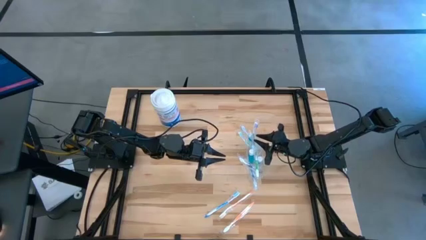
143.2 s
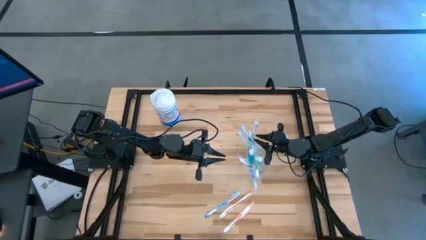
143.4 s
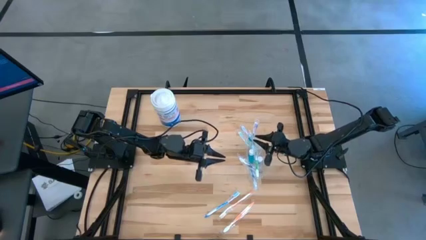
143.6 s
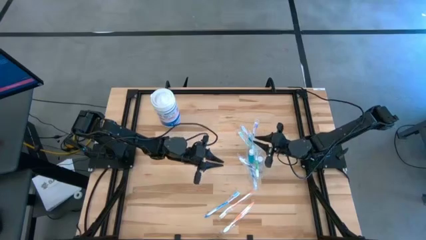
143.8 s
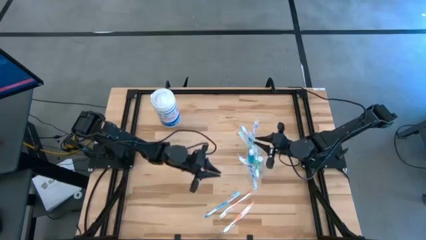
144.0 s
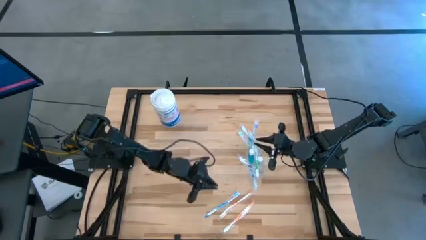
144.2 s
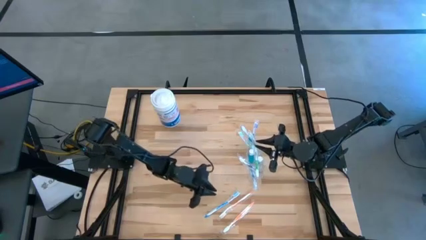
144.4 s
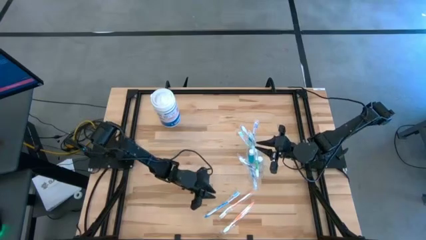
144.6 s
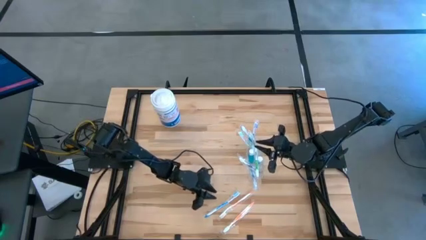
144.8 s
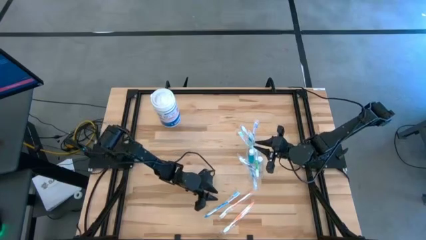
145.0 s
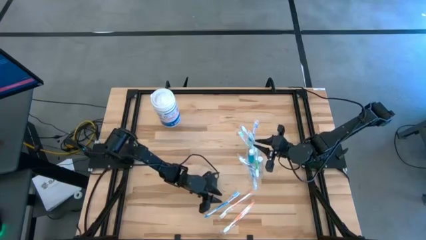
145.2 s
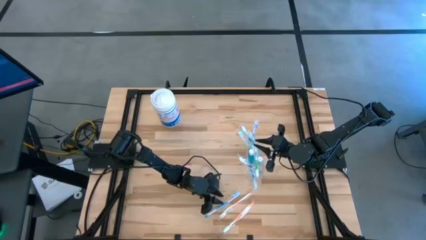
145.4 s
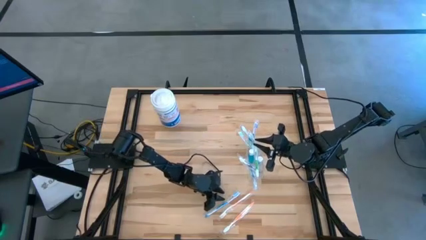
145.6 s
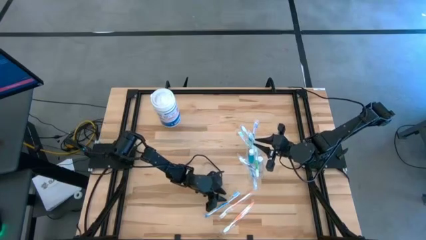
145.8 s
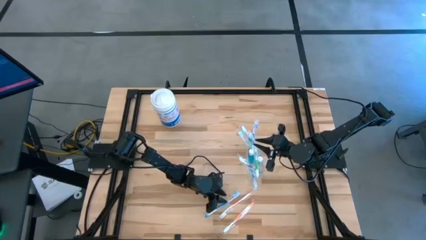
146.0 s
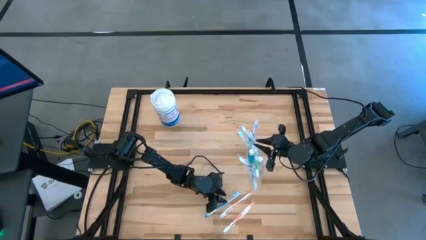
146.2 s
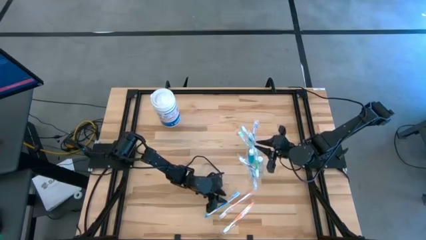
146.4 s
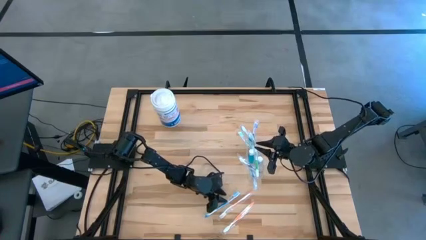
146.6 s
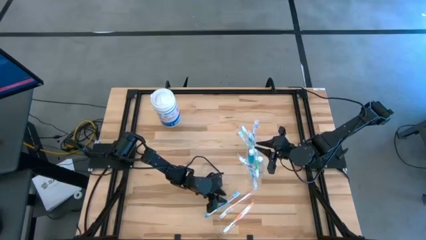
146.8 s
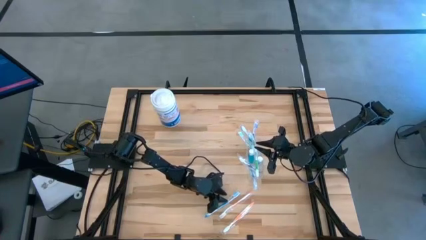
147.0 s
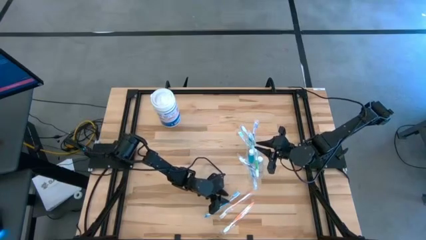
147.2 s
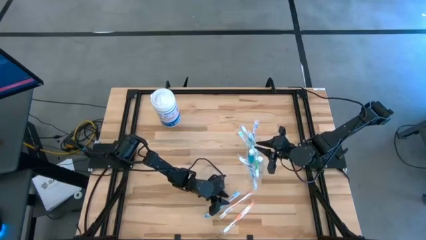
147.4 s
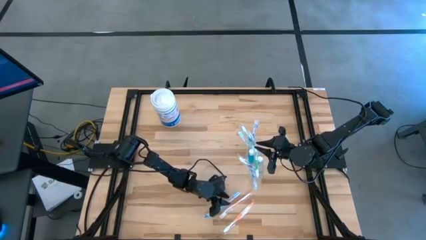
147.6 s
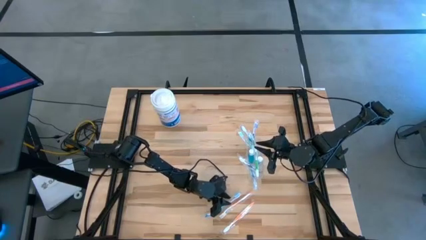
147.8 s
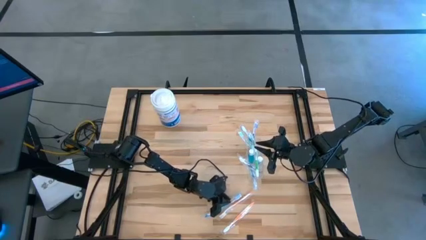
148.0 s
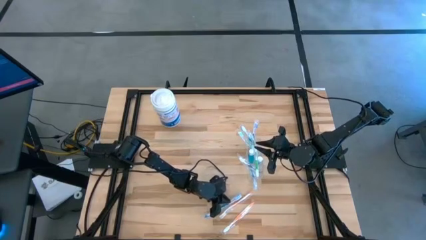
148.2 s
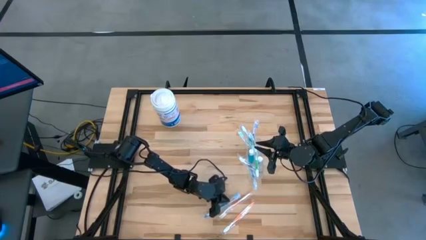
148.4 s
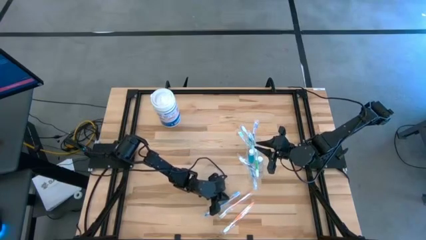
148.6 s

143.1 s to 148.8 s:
Task: Pick & Place toothbrushing station
Put the blue toothbrush into the transparent organizer

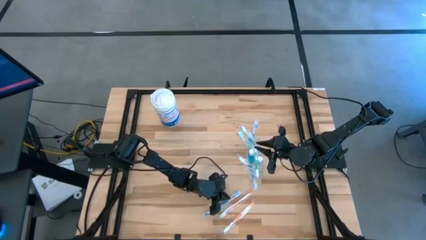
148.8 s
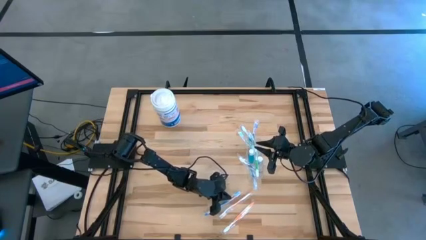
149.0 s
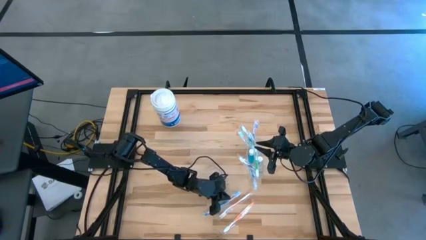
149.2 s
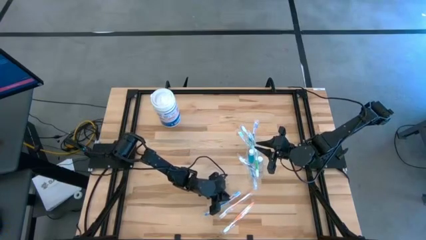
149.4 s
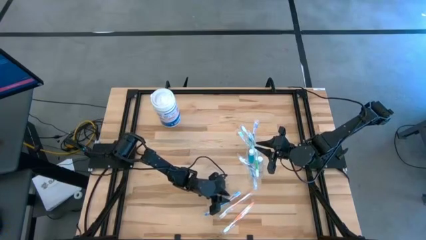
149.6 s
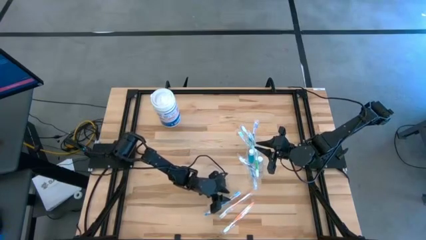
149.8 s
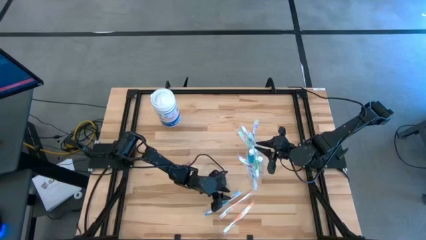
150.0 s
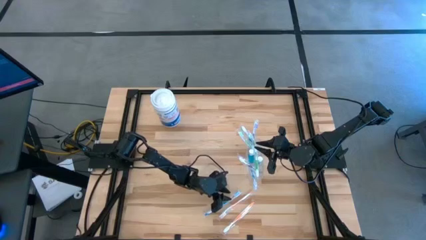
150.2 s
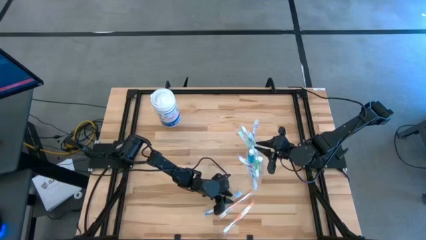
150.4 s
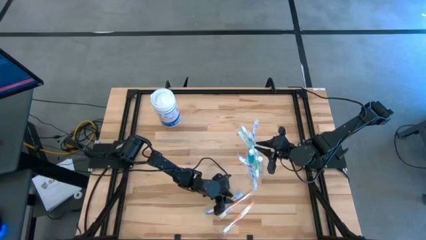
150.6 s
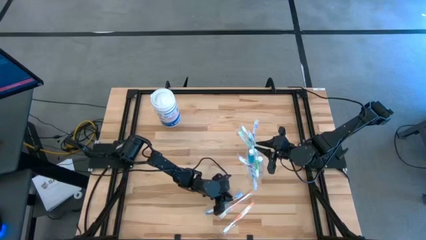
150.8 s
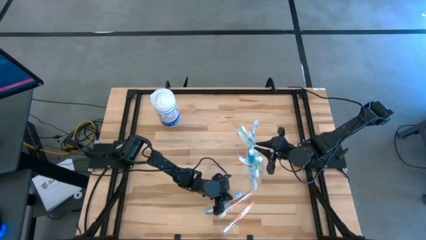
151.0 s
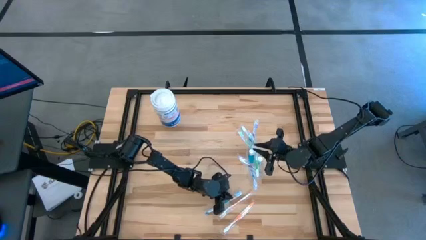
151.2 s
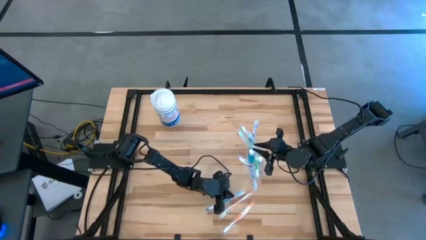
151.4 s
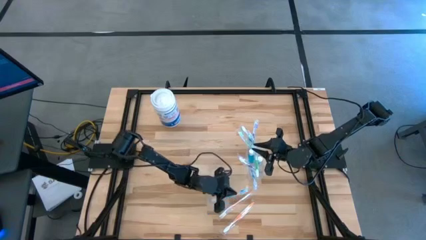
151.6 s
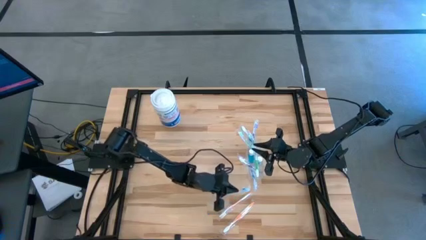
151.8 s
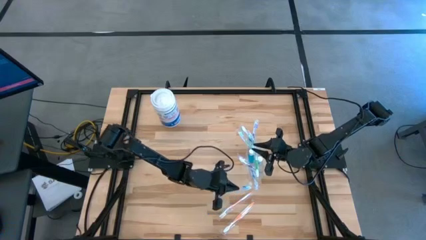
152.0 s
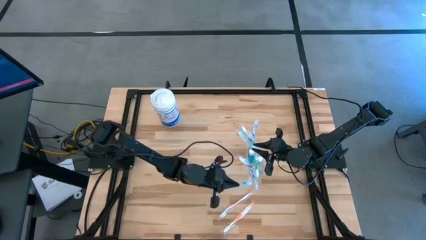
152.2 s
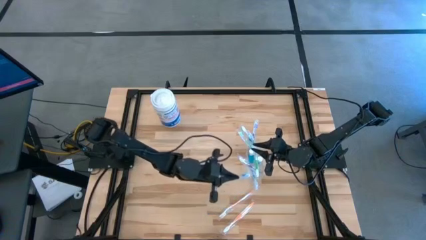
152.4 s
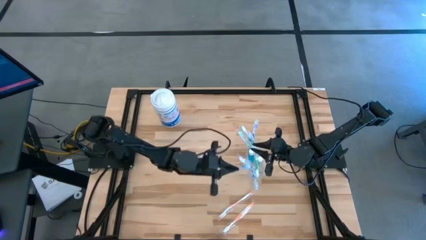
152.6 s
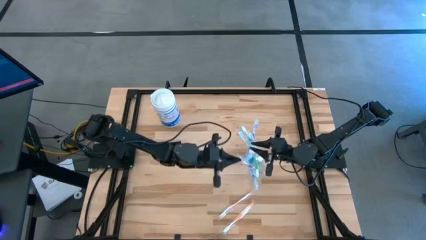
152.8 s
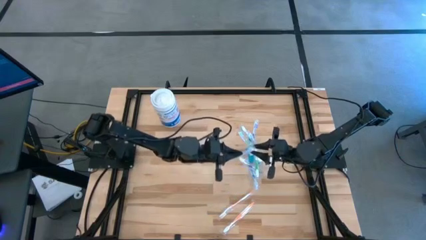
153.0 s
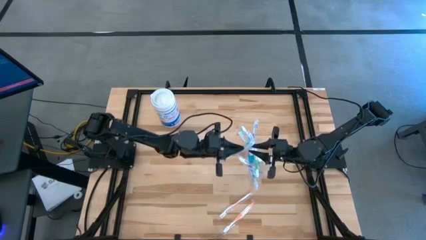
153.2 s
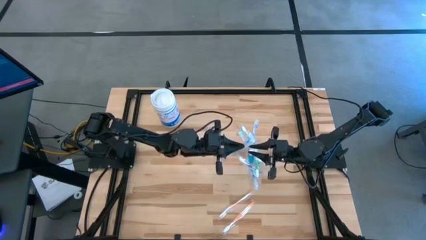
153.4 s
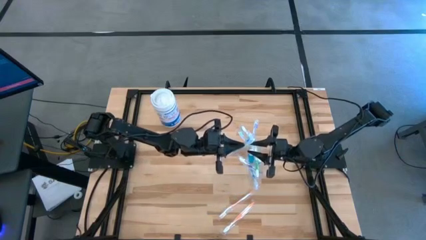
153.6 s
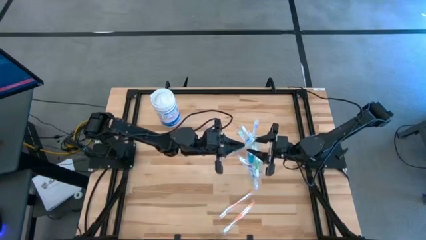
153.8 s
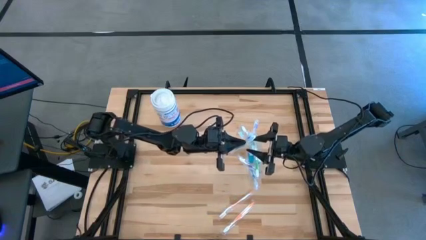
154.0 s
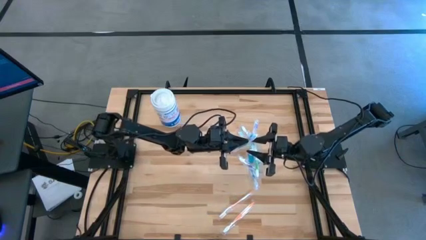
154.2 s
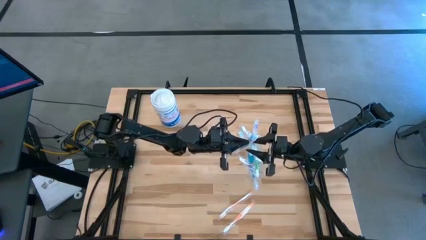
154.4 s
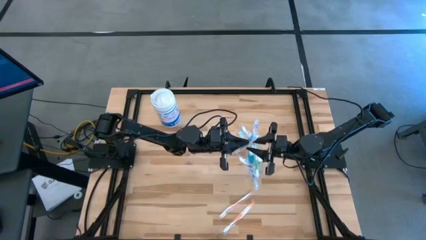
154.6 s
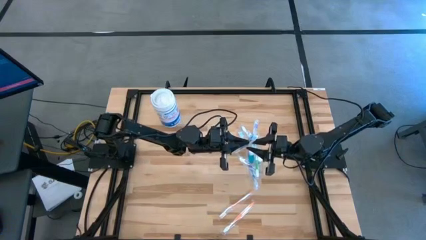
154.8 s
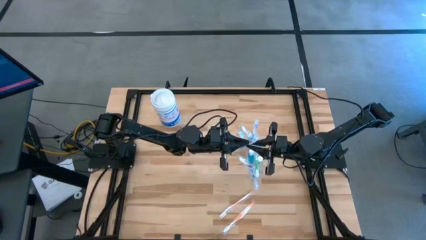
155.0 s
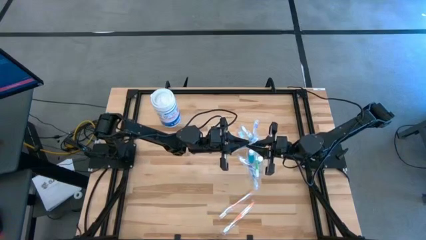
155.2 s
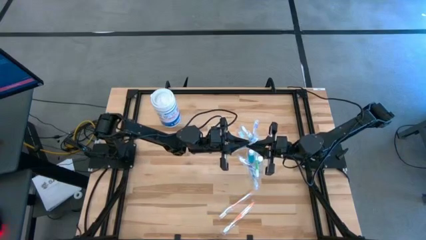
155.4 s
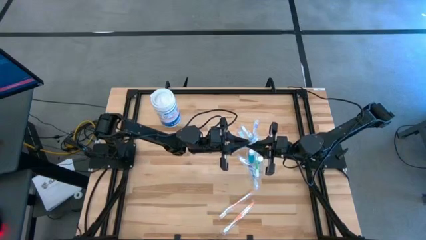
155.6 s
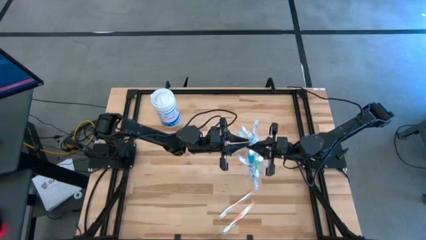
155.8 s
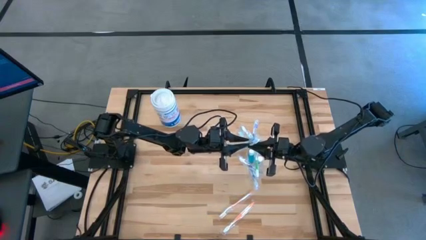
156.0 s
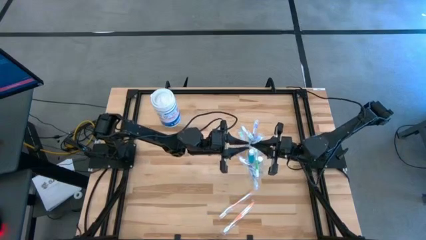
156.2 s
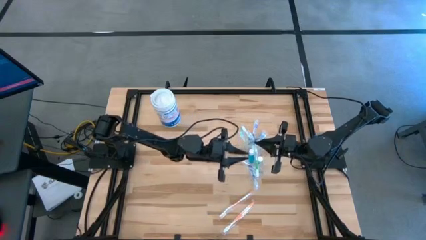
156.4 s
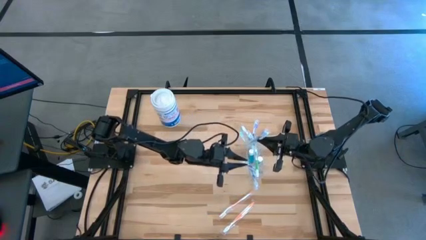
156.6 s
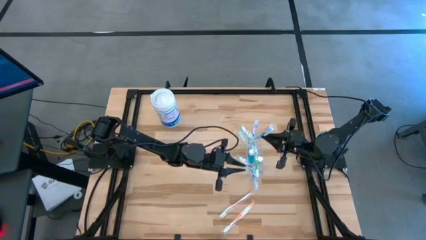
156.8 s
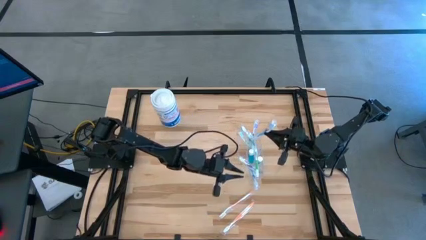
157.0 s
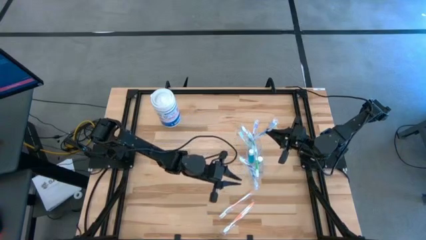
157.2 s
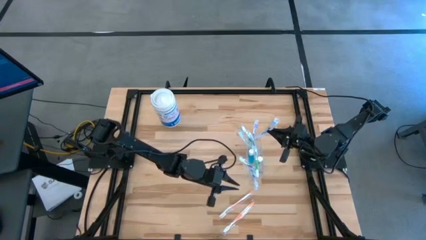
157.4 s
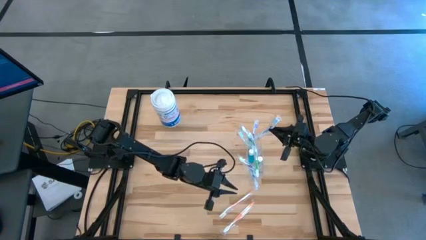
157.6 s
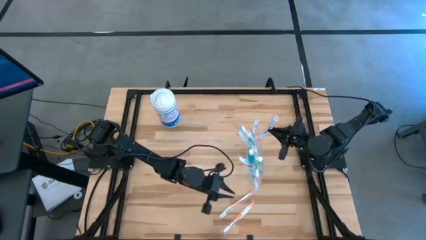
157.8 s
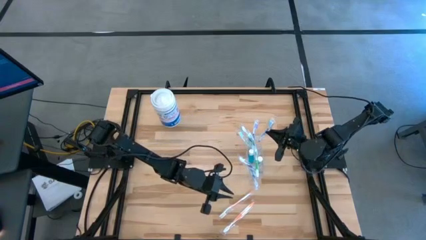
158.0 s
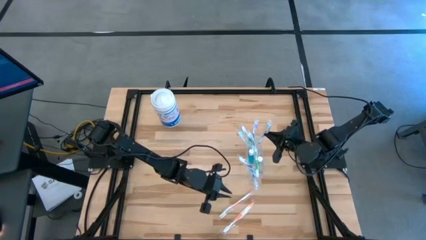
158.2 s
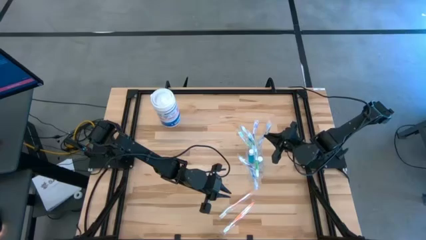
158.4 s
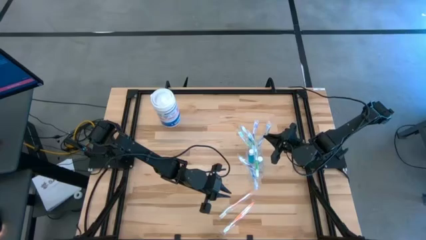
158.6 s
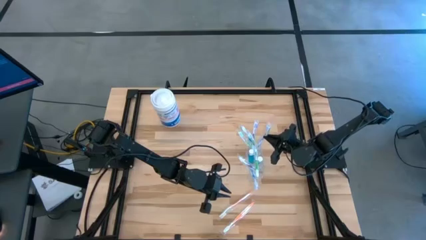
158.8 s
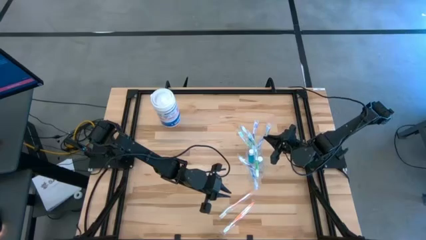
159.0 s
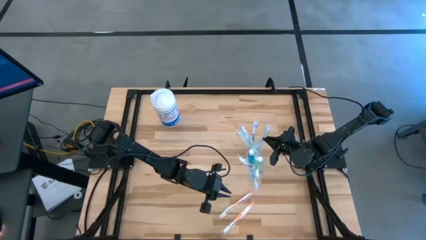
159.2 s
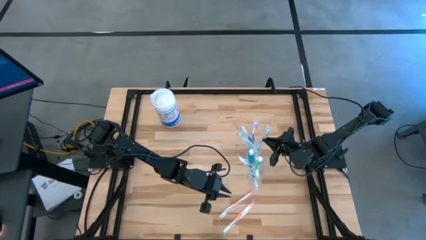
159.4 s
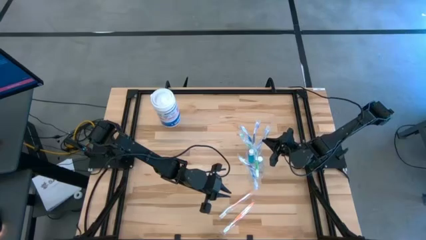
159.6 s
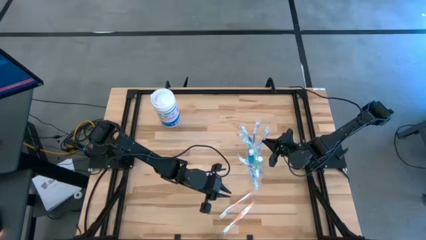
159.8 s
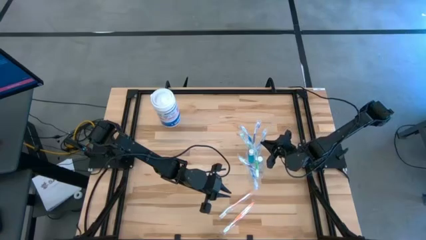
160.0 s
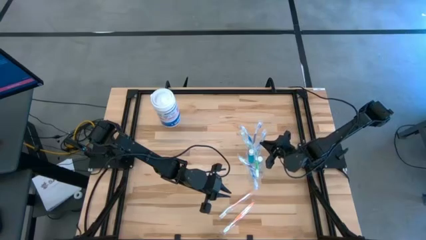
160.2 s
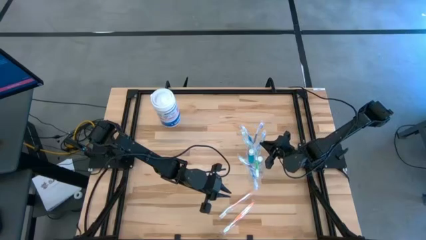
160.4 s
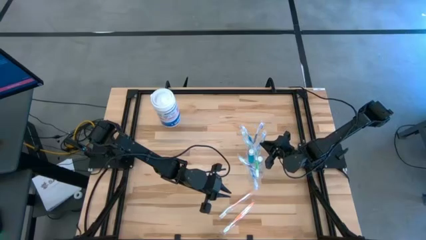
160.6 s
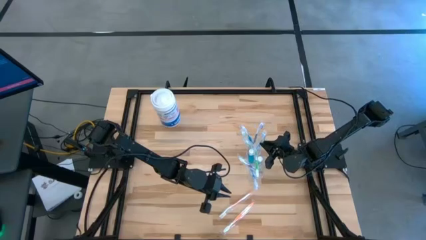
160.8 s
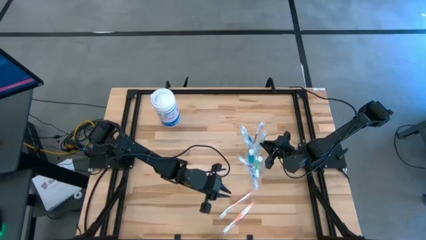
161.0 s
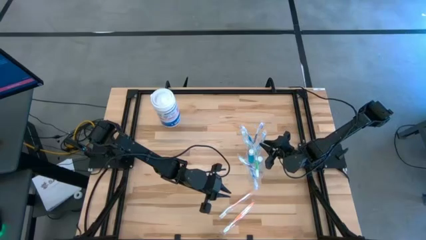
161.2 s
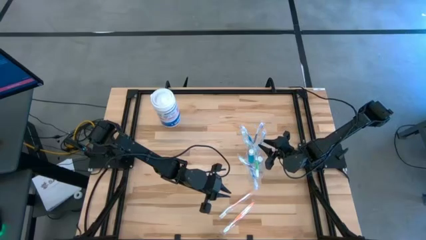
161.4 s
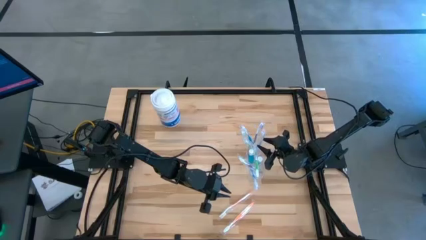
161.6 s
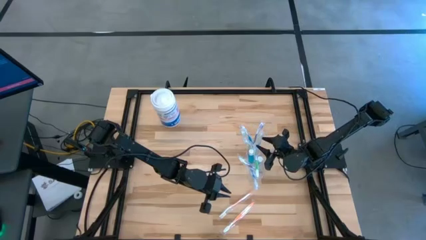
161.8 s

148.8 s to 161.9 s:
Put the blue toothbrush into the transparent organizer
